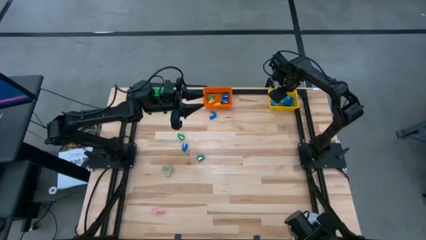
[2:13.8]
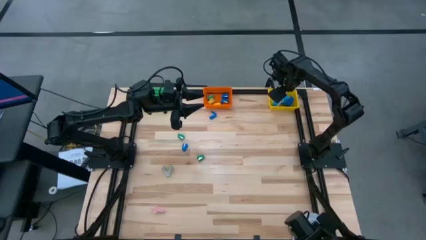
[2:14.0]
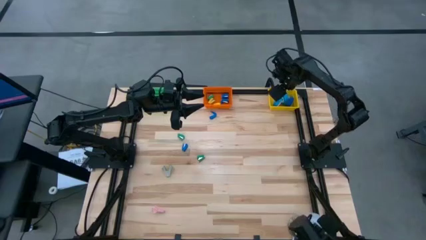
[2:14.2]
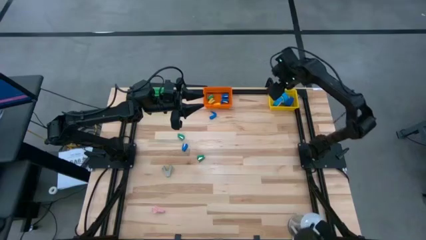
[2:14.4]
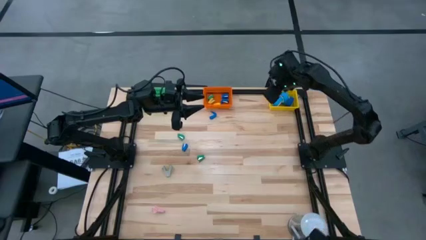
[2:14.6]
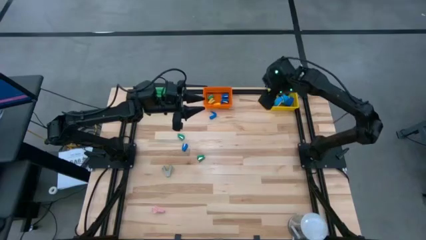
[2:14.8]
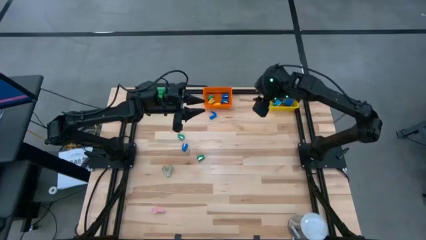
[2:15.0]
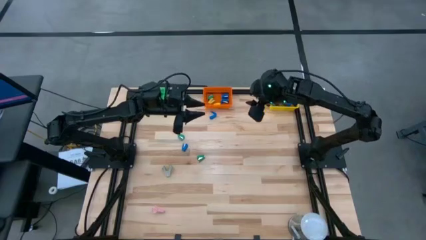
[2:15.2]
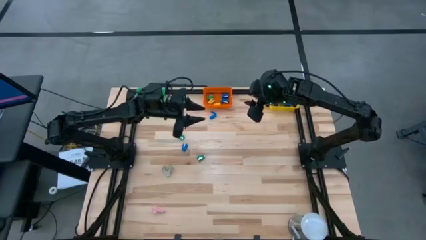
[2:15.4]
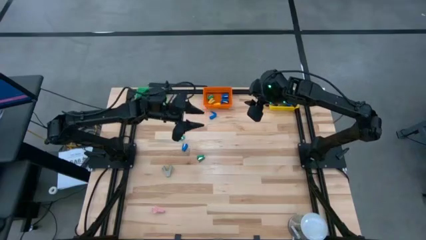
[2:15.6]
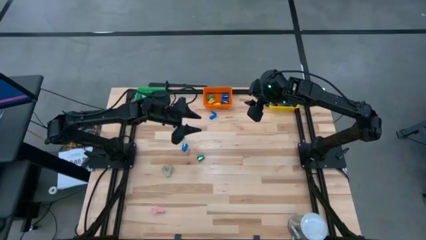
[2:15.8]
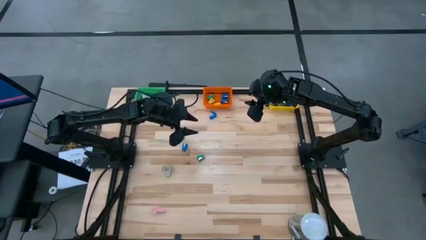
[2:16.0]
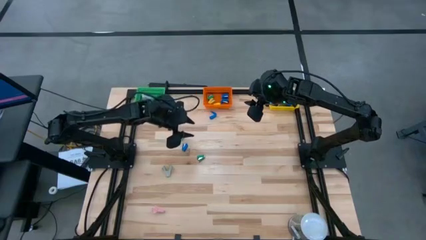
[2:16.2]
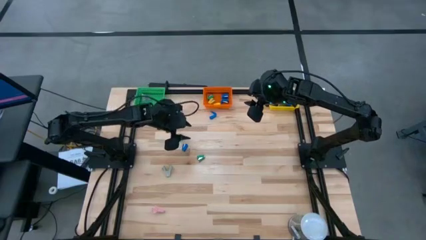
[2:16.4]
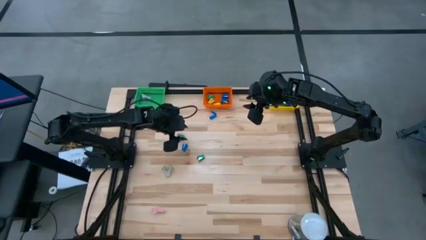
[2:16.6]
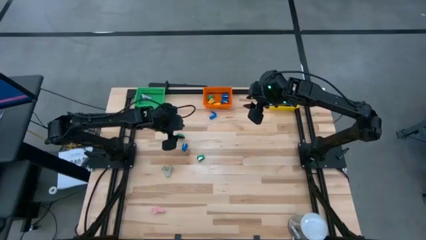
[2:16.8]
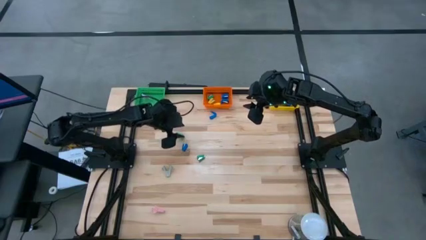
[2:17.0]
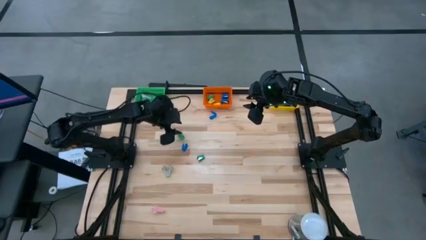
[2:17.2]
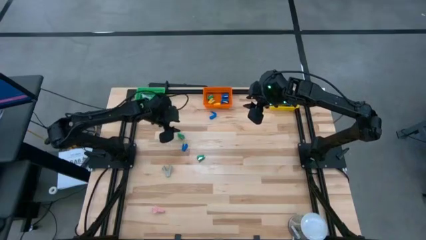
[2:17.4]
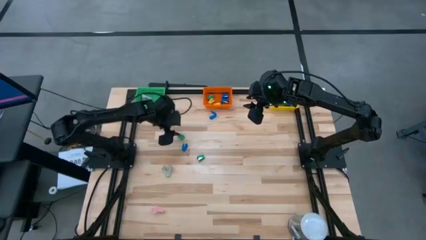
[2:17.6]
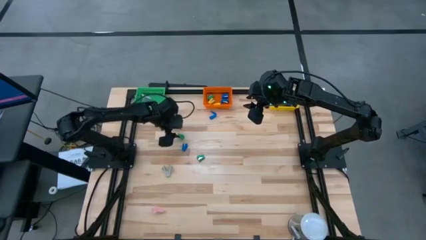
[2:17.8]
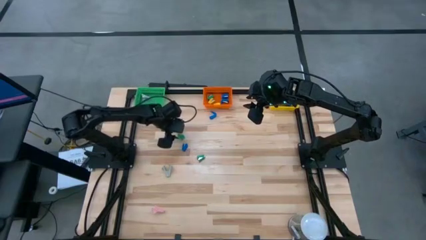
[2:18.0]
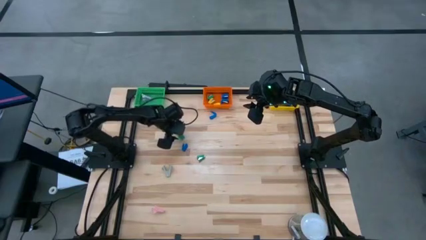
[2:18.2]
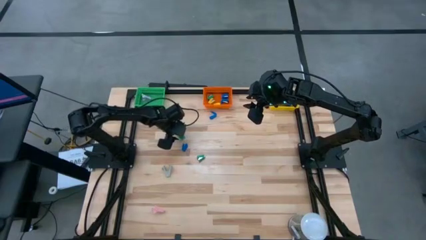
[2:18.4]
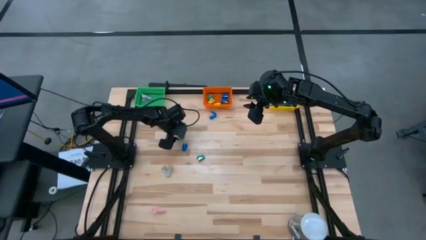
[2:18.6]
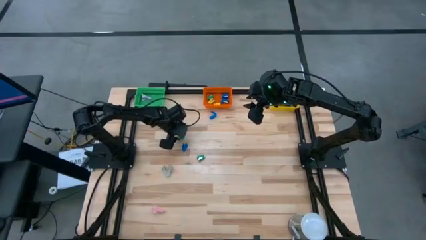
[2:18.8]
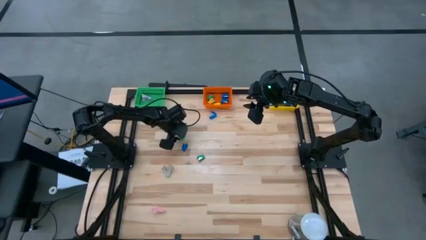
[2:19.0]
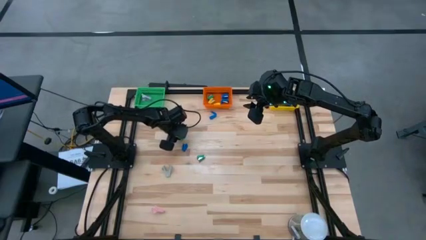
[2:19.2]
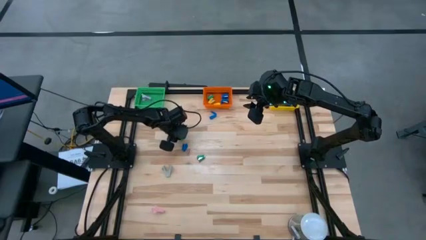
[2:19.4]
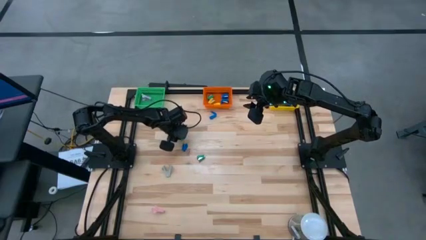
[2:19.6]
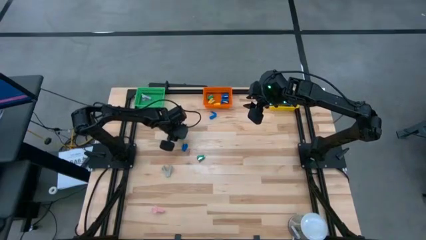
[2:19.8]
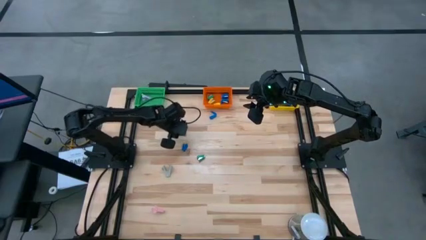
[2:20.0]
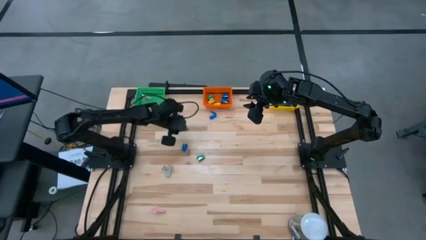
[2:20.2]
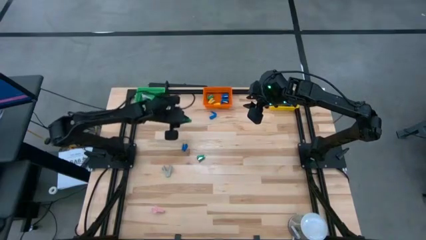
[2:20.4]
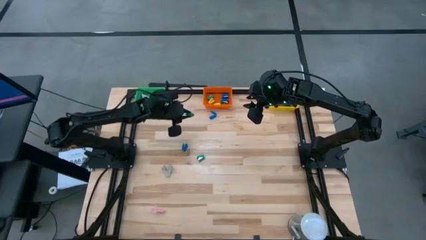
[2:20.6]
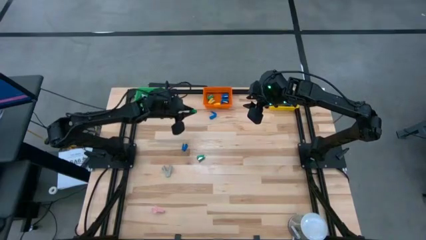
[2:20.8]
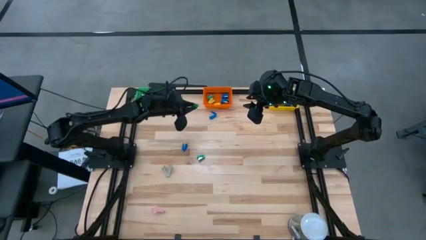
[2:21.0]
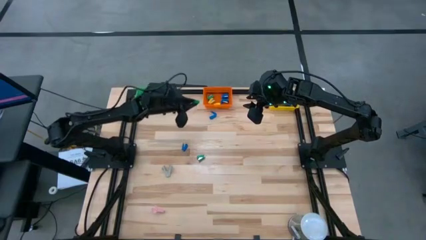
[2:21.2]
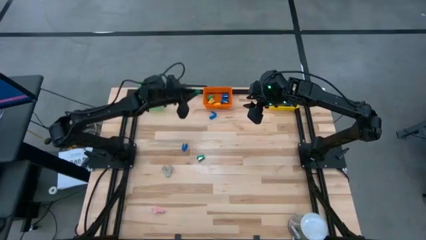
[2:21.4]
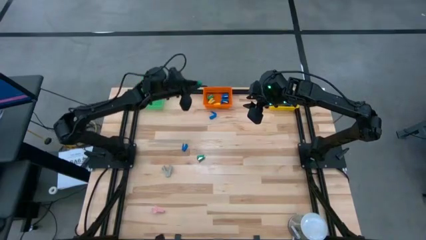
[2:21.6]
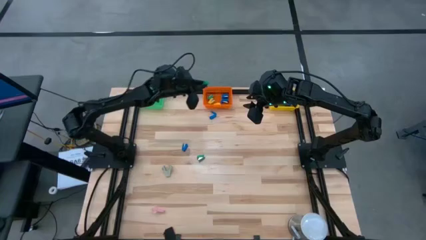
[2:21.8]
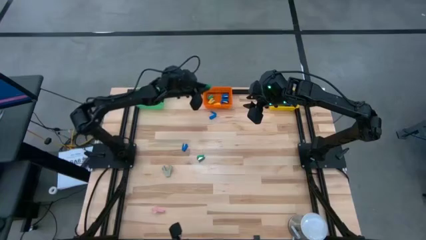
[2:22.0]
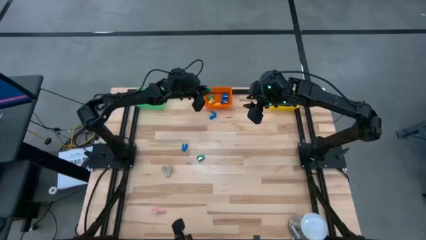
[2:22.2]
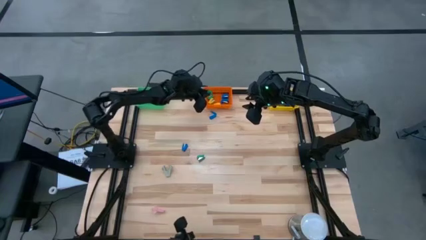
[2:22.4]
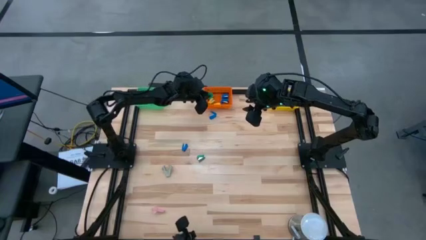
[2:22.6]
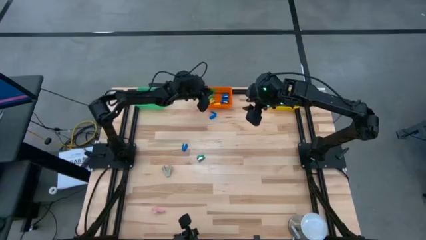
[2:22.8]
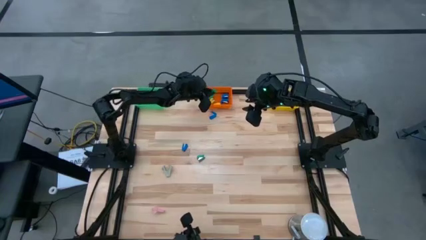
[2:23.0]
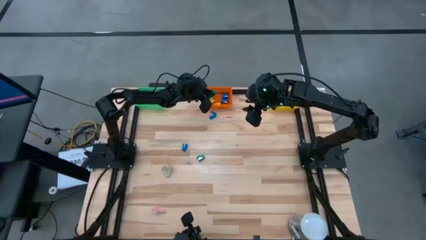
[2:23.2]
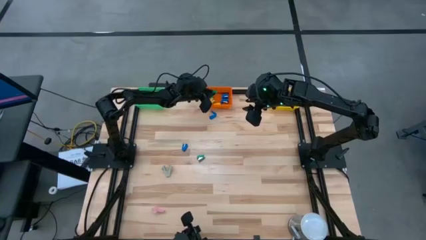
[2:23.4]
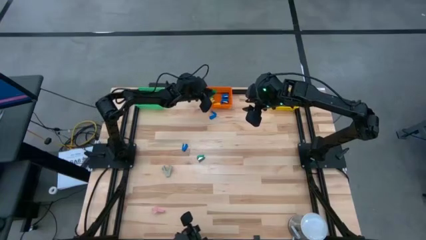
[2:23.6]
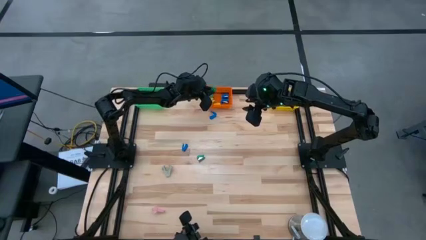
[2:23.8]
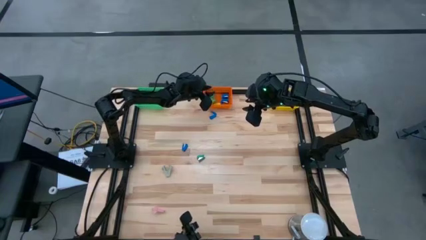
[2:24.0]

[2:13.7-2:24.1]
Task: Pick and place Stapler, Stapler remover, tape
Put the green stapler into the orange bin

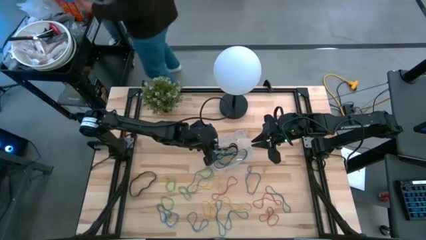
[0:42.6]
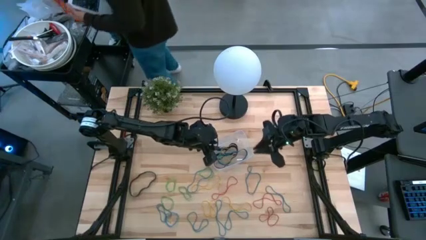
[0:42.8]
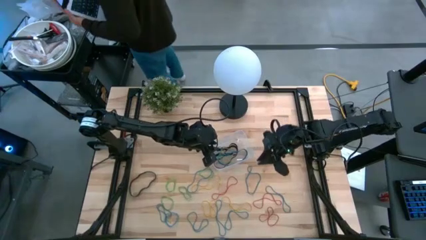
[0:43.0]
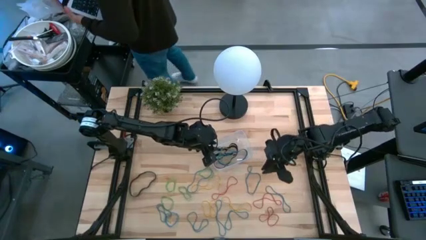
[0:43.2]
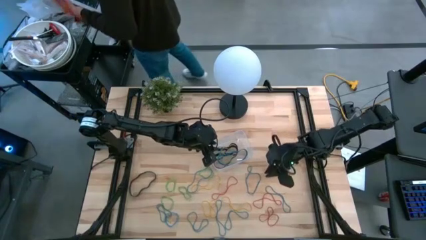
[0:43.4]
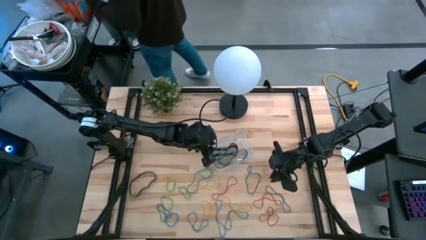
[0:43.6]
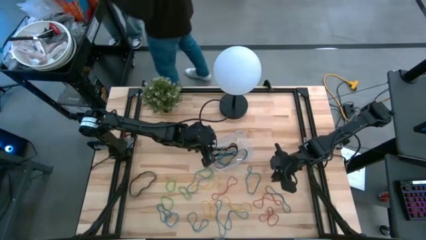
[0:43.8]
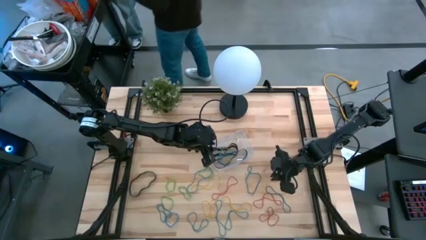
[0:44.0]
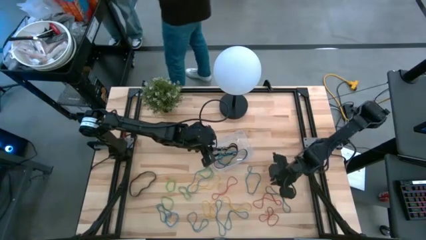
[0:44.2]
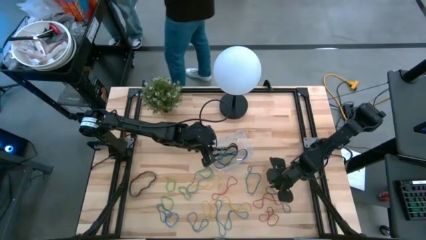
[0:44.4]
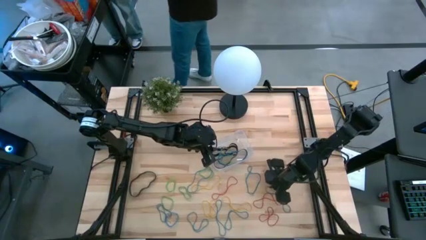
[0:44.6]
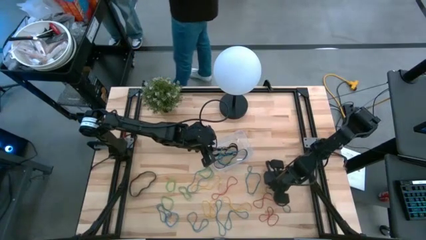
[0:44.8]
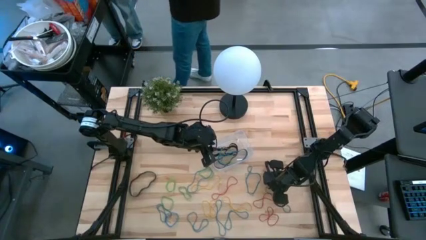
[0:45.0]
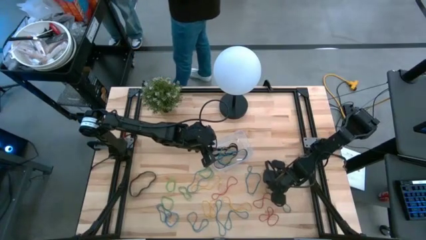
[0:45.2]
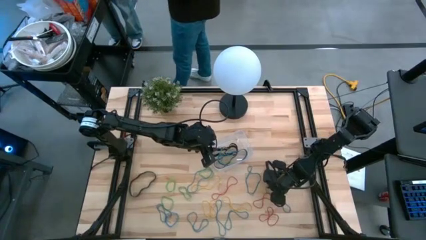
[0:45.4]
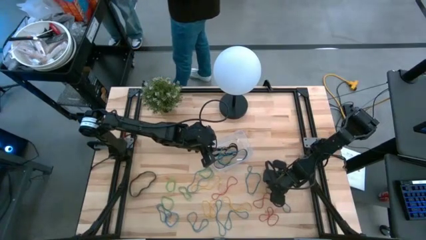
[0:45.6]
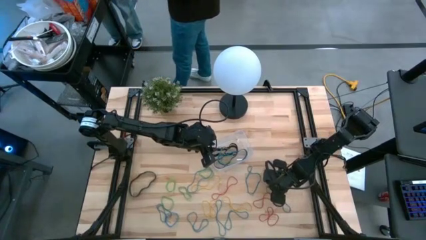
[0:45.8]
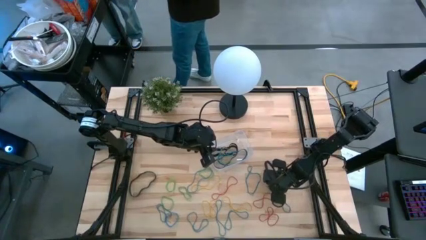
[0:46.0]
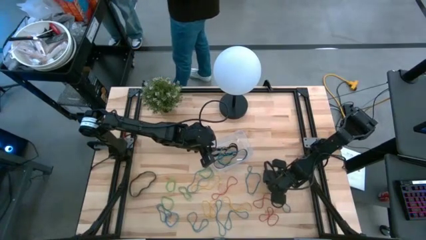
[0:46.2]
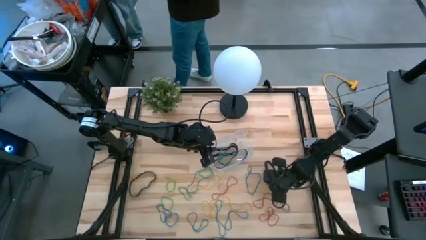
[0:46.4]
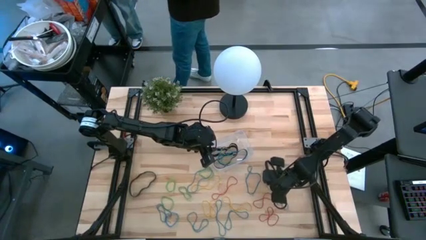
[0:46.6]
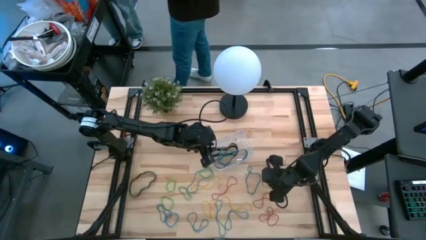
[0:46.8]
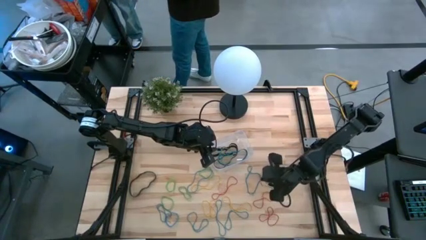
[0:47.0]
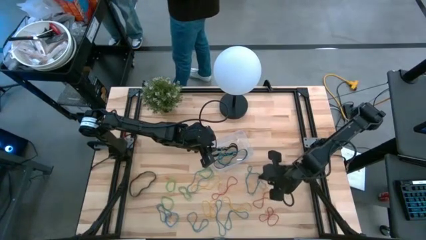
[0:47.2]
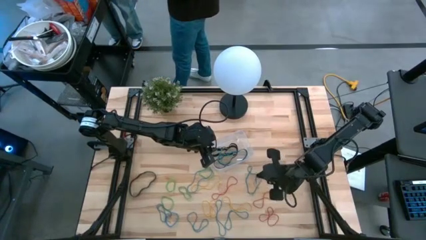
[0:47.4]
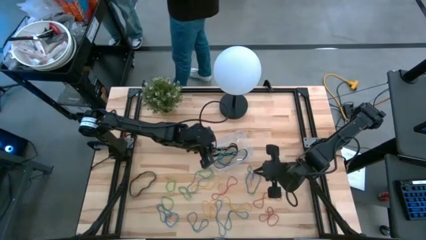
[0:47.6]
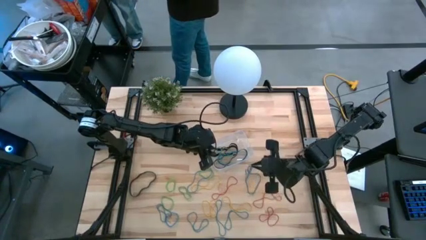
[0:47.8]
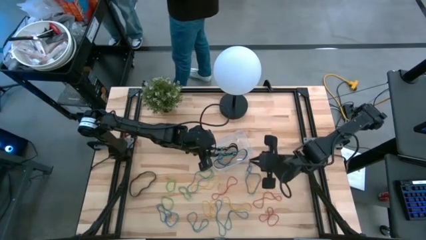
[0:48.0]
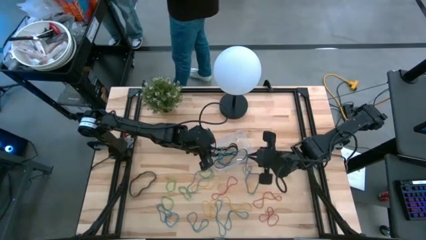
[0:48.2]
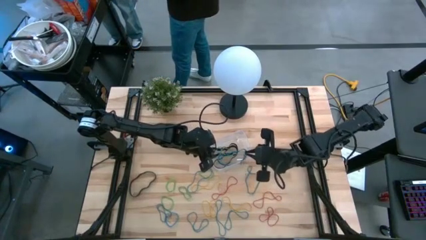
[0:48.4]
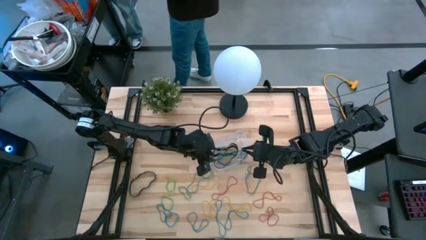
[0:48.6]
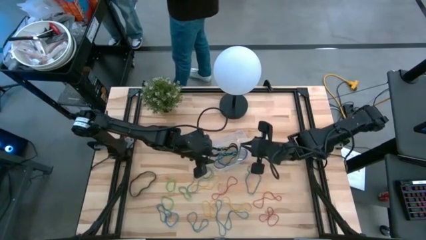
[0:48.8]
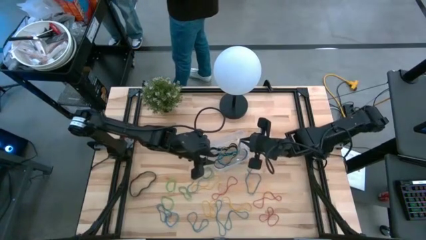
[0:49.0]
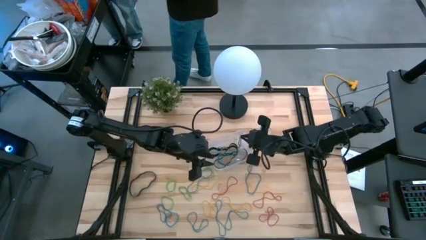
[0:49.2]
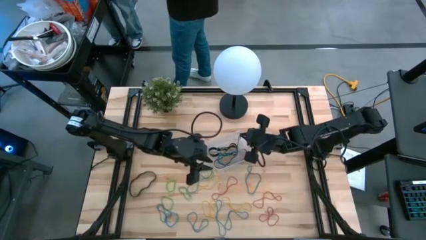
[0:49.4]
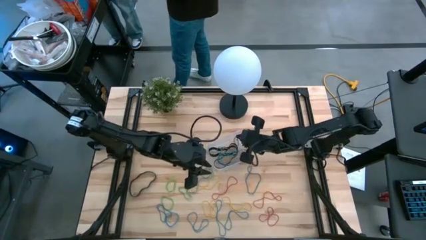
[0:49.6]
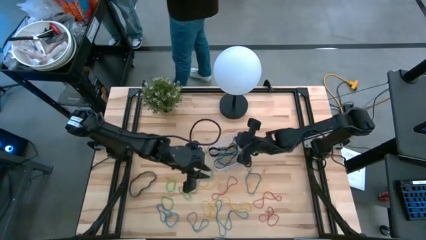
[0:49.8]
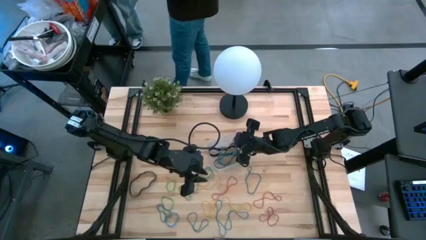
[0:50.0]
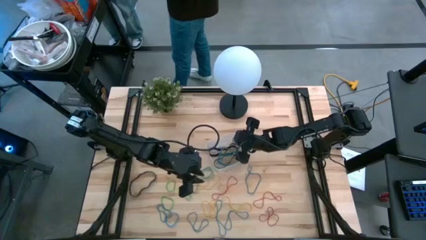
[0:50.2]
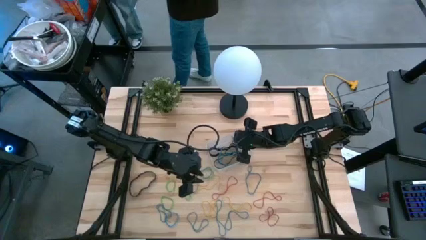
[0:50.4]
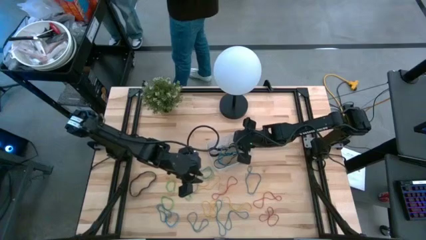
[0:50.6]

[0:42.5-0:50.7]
Task: Pick and place rubber bands into bin
Put the blue rubber band into the transparent bin
